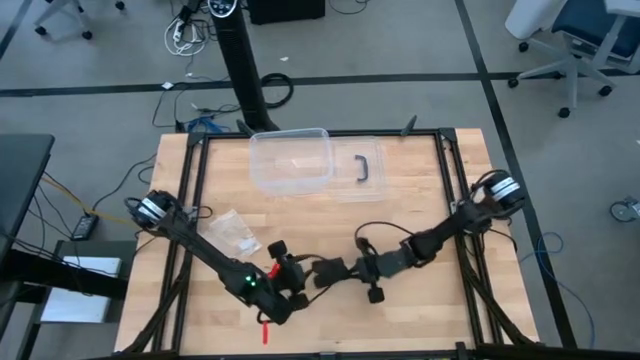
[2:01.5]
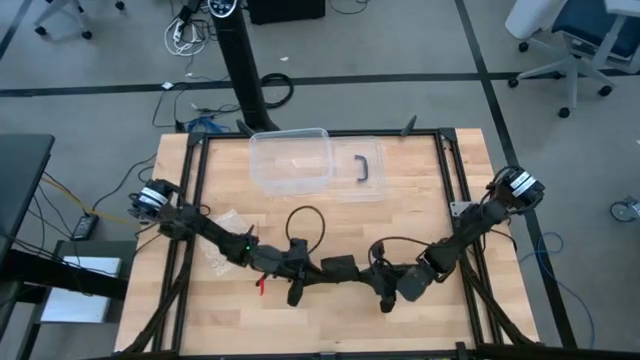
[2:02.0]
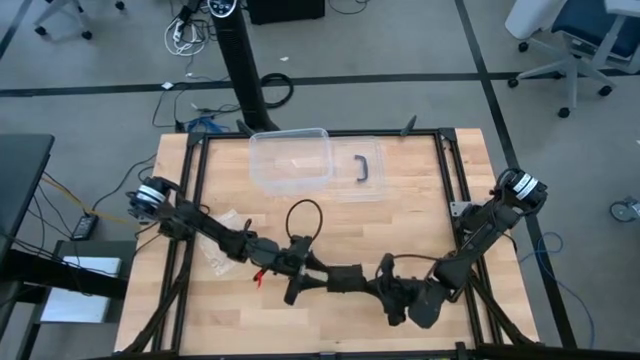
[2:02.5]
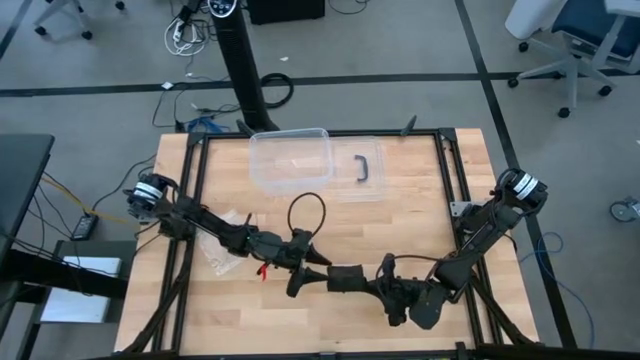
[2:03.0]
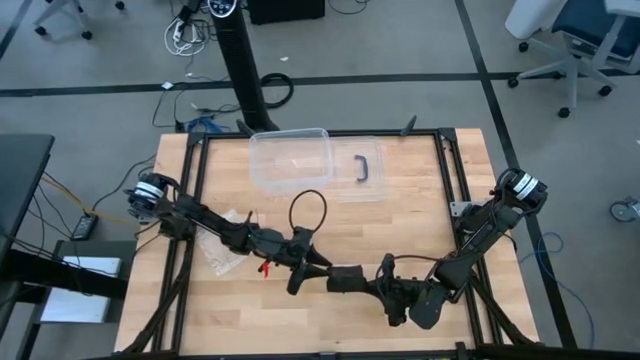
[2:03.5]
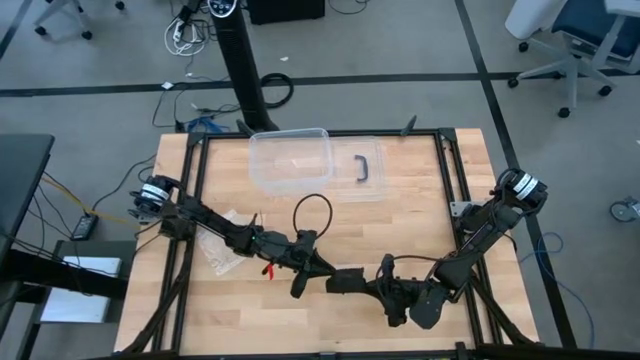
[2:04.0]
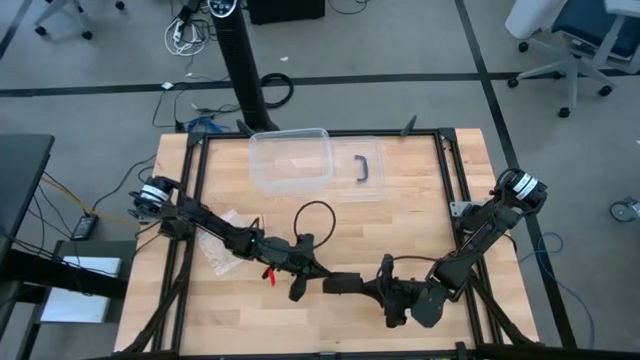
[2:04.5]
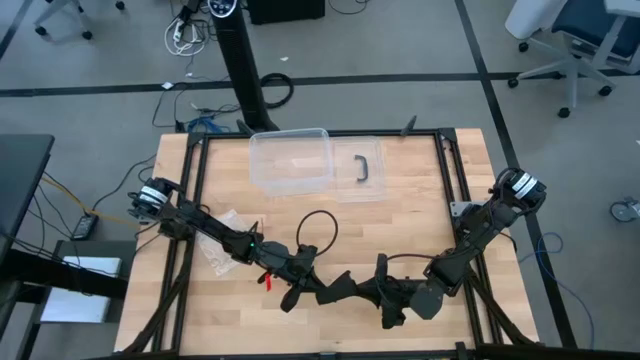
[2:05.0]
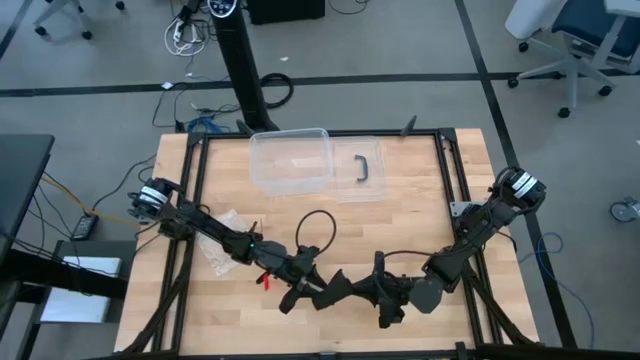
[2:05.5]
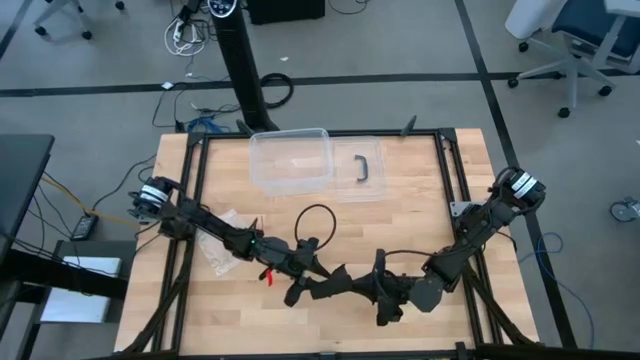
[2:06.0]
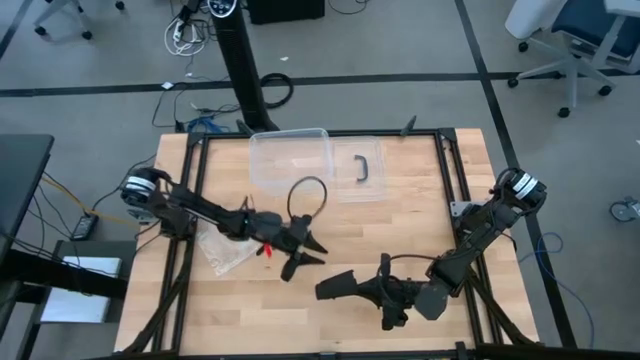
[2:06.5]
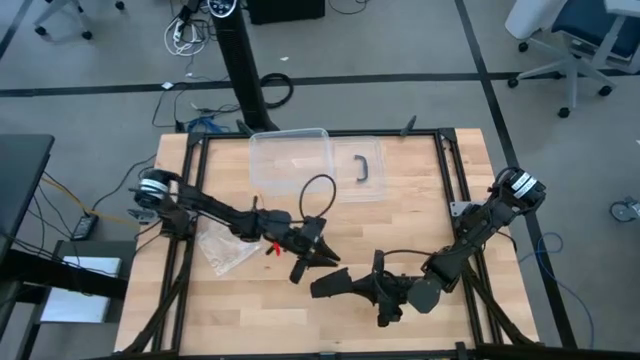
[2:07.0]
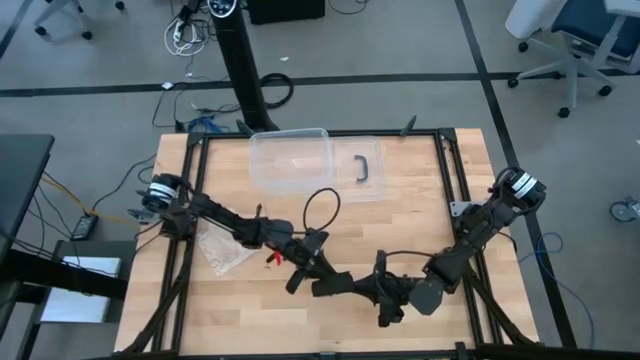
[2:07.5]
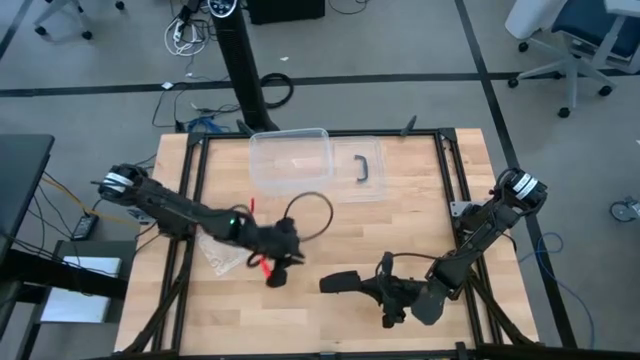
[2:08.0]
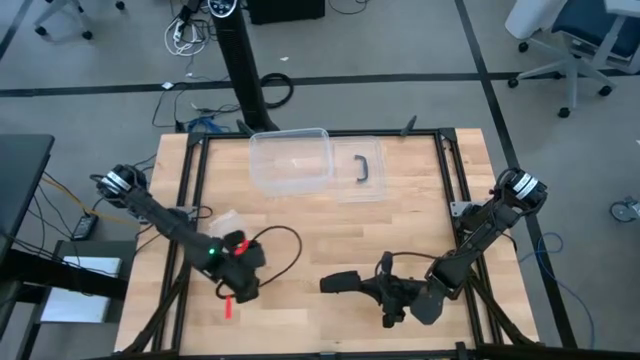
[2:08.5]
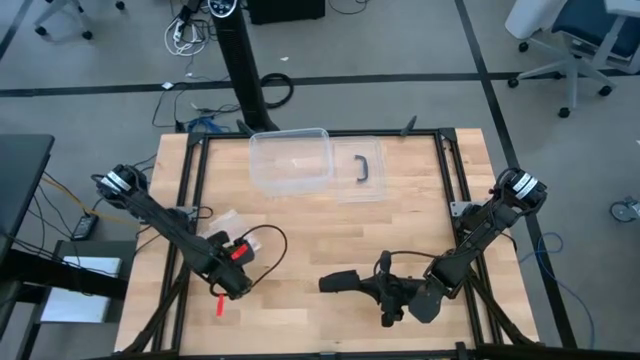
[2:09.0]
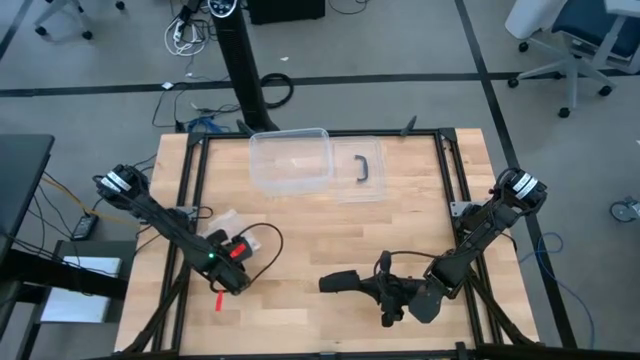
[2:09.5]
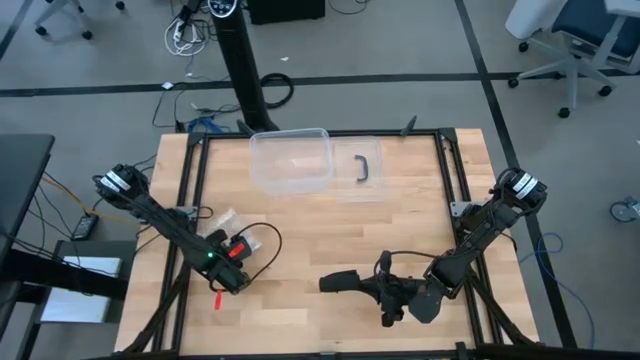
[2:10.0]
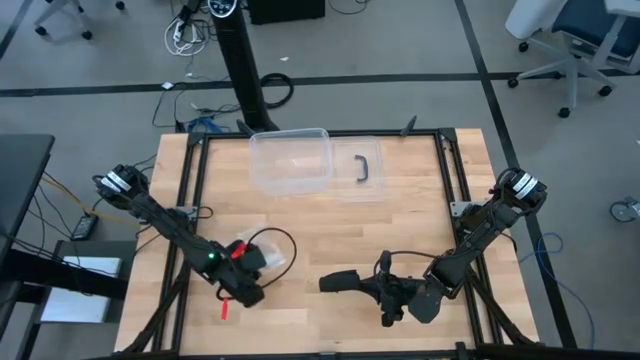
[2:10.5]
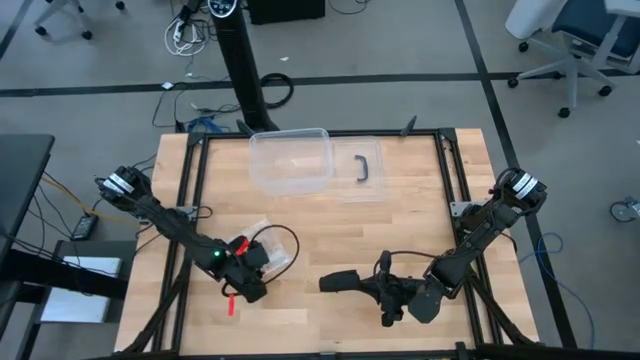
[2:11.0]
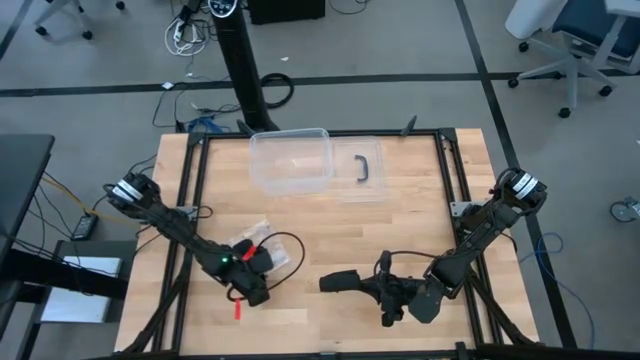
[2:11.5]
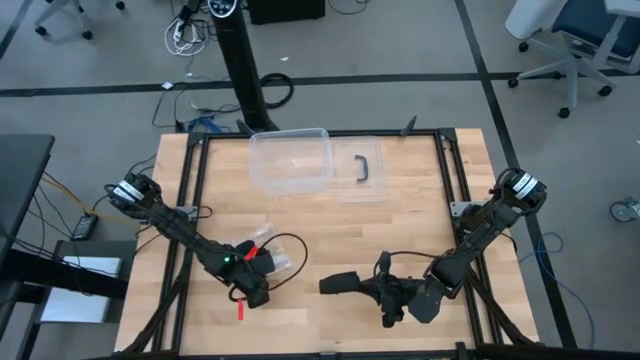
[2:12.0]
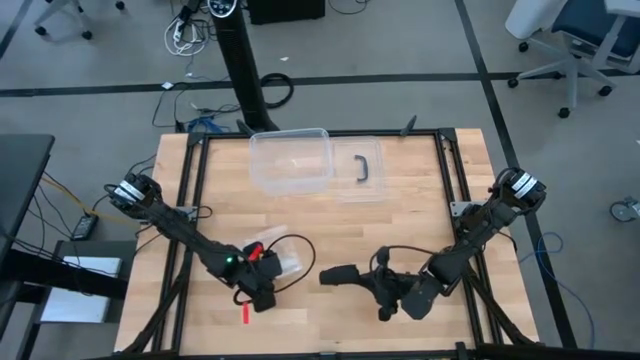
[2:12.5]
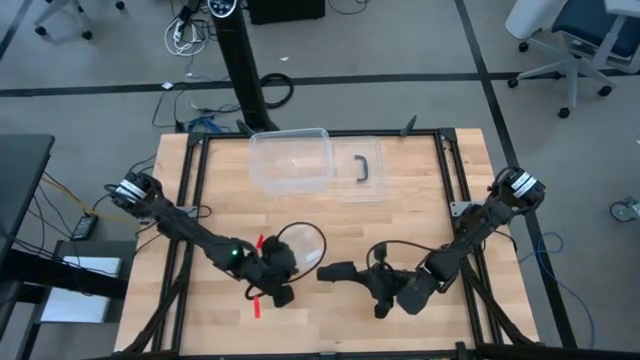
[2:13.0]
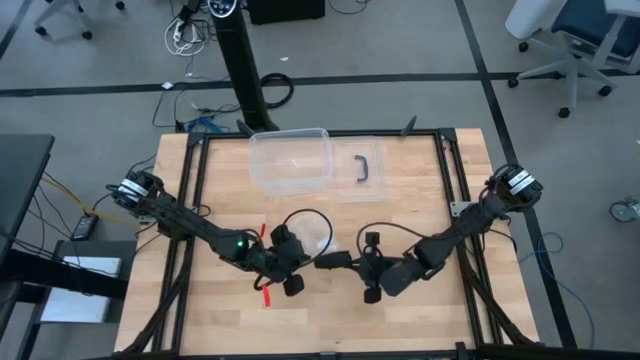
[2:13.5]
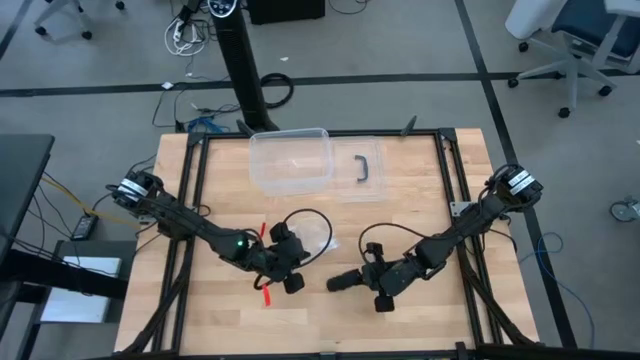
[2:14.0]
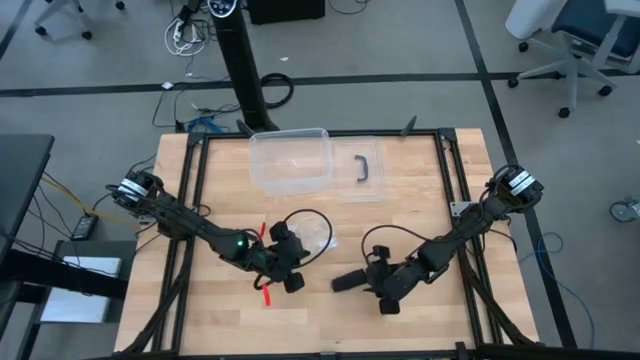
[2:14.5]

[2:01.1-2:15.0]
Task: Roll bandage
Roll the black bandage

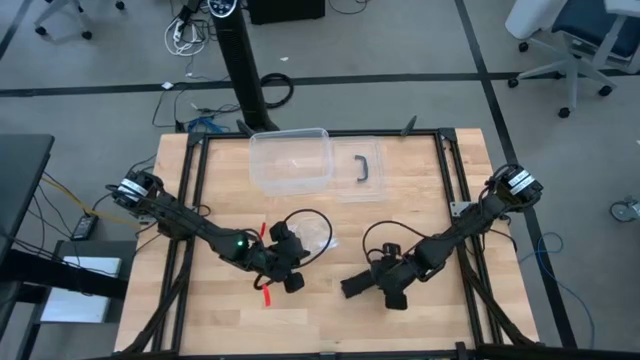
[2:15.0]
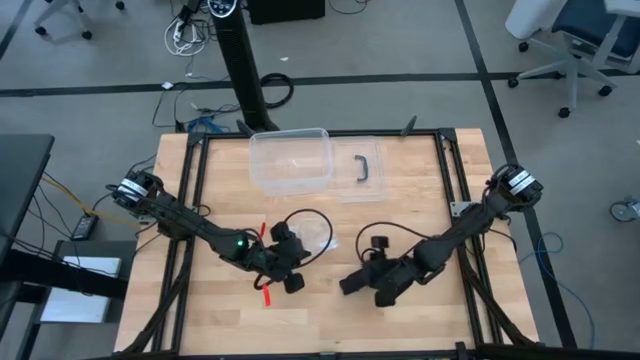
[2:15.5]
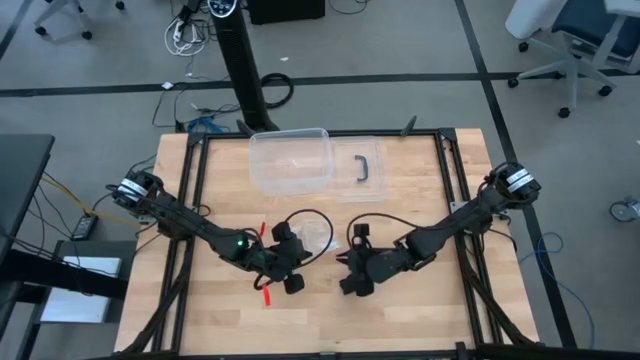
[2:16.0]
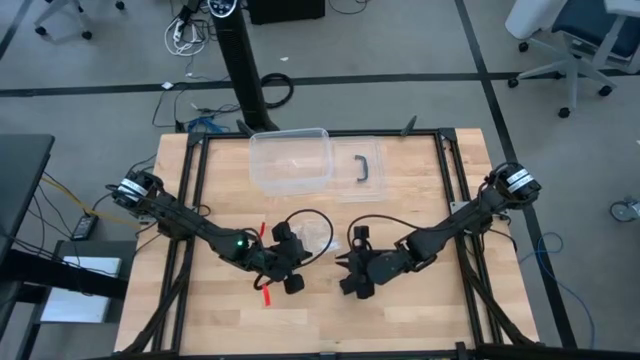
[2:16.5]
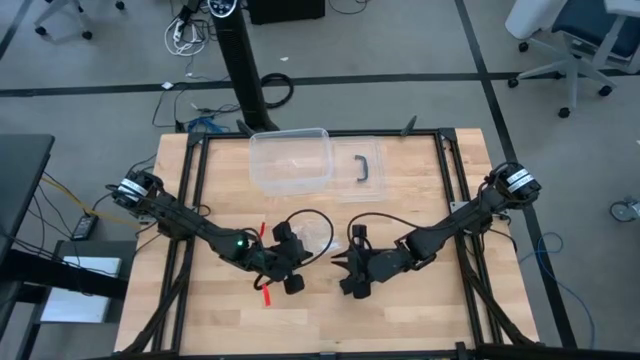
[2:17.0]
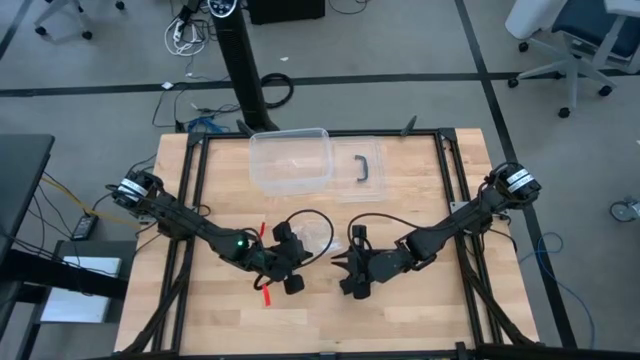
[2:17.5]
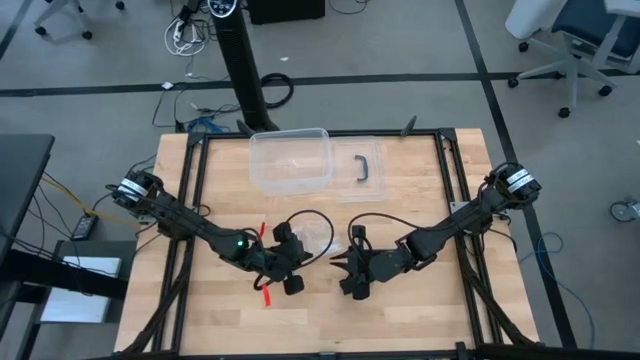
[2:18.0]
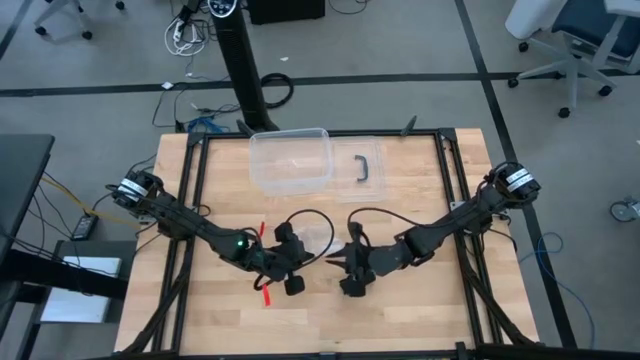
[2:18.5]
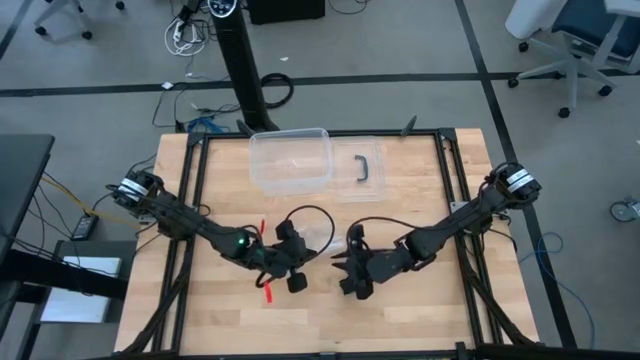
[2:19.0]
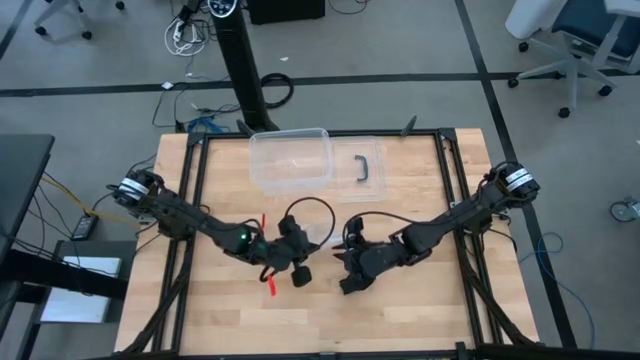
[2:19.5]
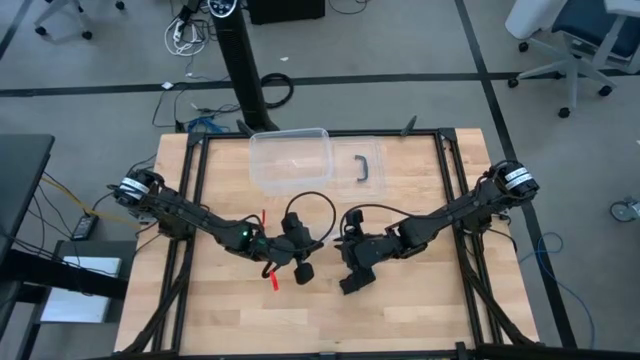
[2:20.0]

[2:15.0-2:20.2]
Open the transparent zip bag

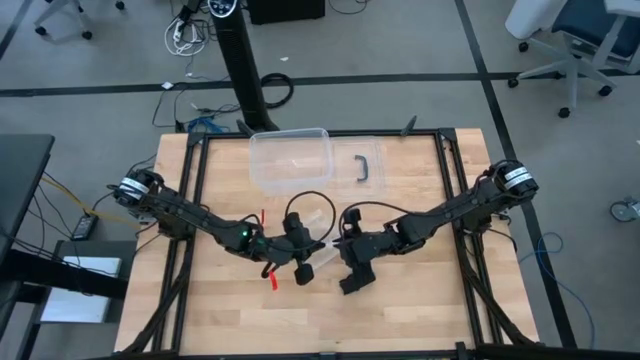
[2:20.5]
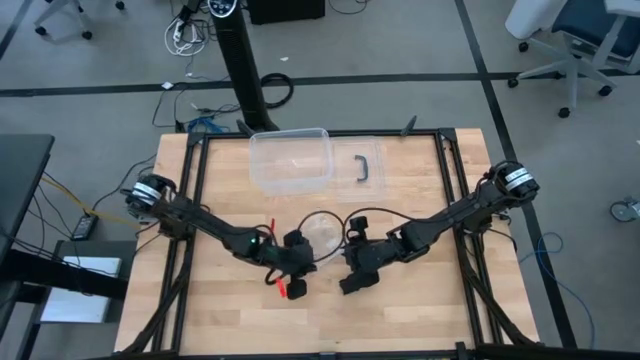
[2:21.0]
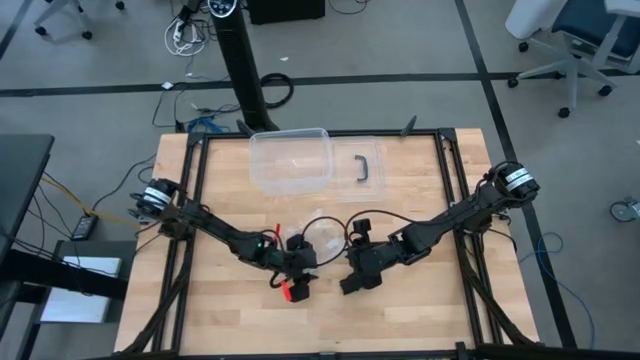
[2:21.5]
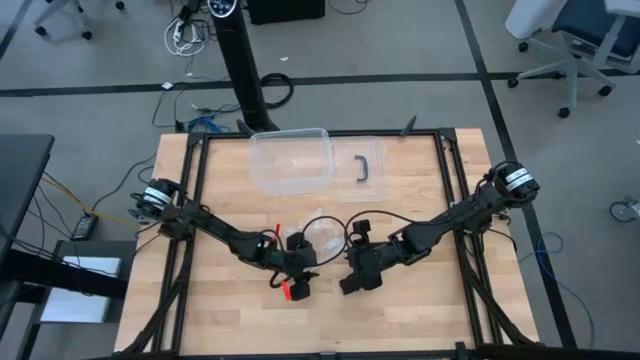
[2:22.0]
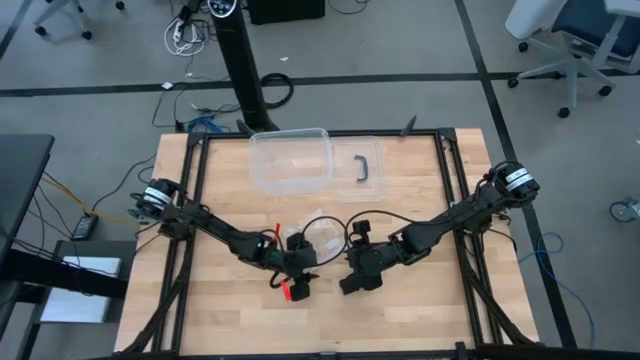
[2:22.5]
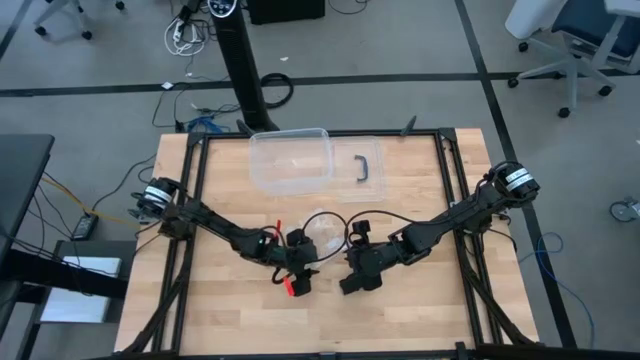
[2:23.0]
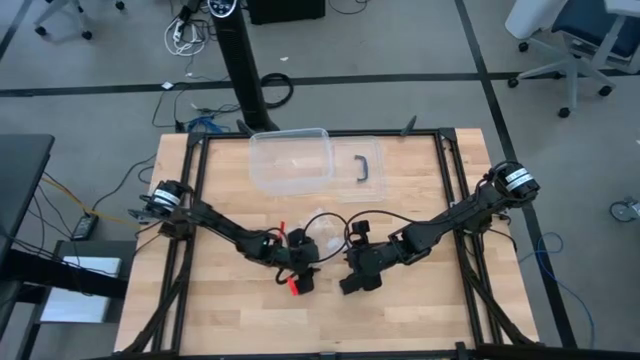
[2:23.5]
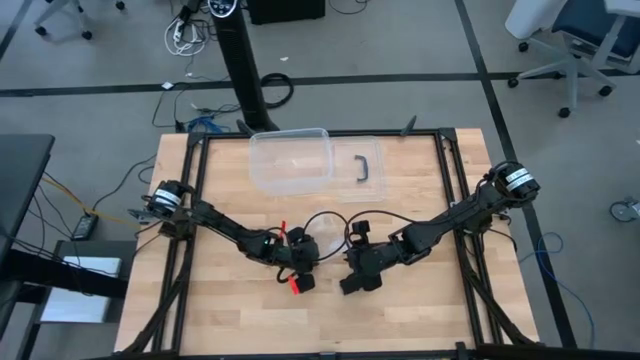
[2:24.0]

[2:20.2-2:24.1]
Open the transparent zip bag
